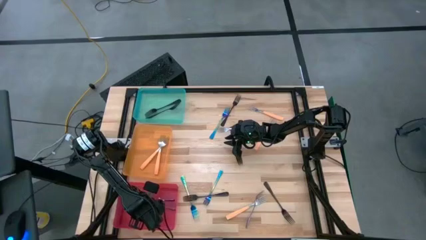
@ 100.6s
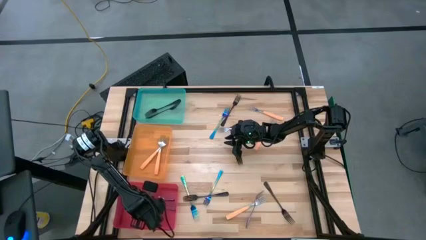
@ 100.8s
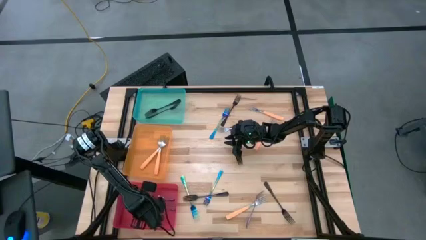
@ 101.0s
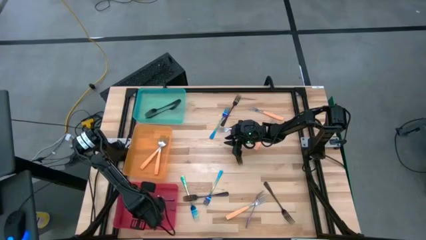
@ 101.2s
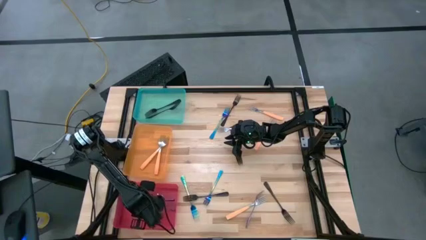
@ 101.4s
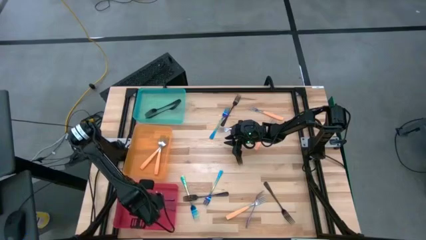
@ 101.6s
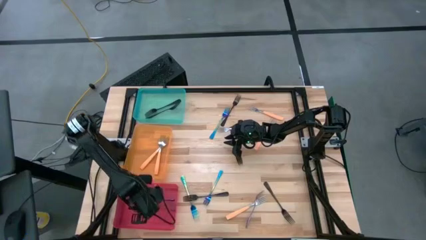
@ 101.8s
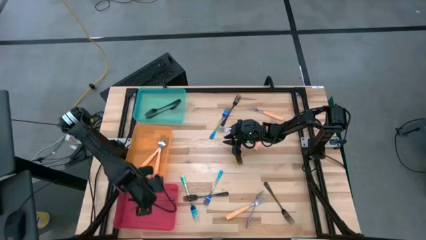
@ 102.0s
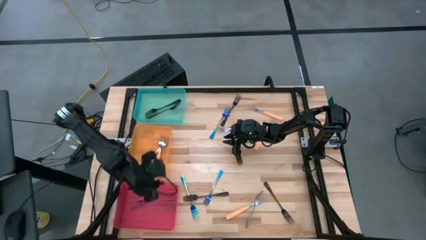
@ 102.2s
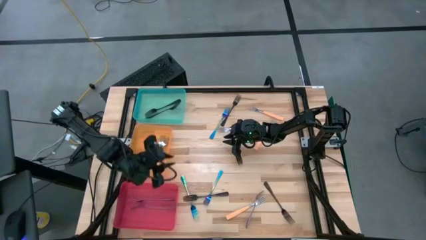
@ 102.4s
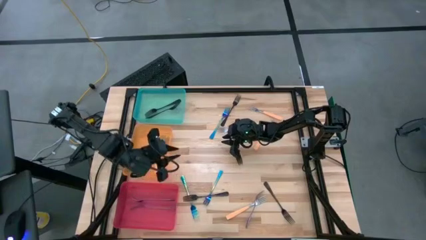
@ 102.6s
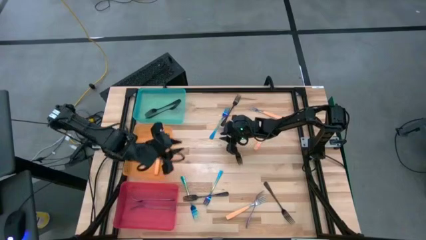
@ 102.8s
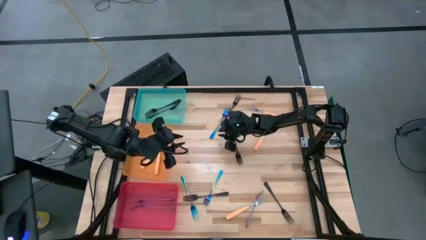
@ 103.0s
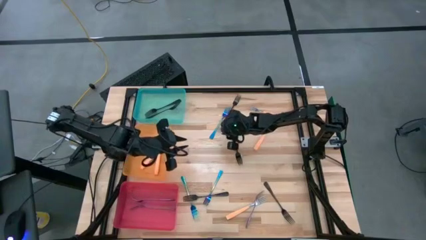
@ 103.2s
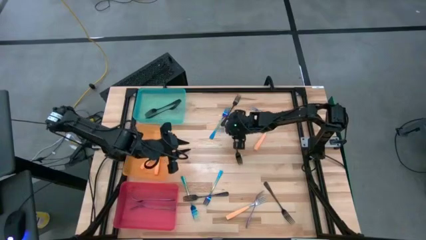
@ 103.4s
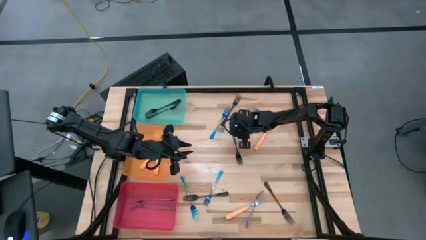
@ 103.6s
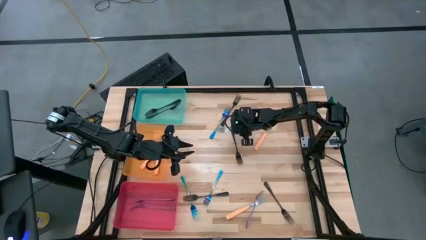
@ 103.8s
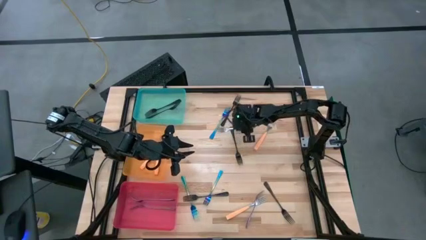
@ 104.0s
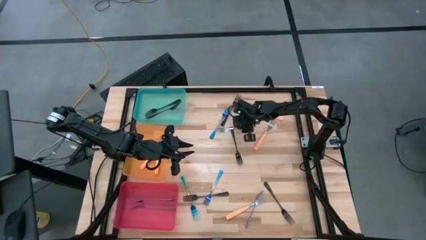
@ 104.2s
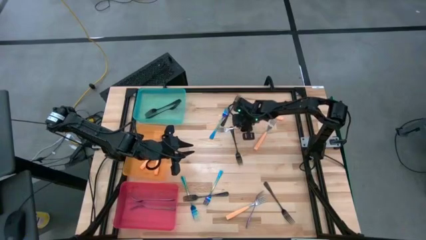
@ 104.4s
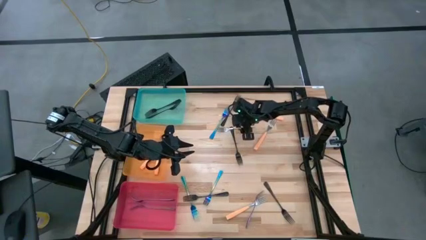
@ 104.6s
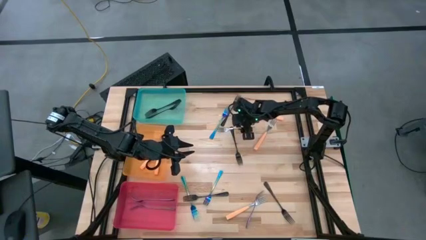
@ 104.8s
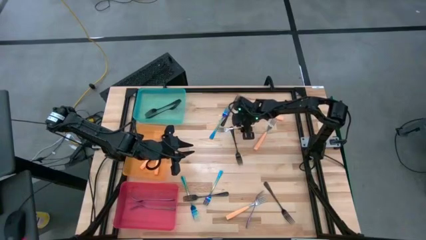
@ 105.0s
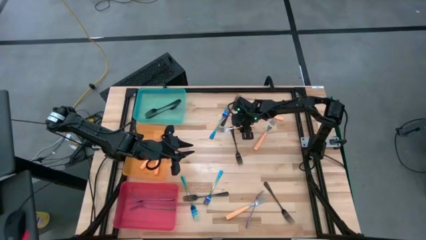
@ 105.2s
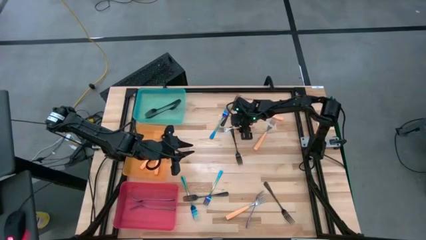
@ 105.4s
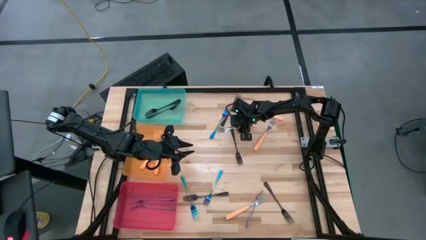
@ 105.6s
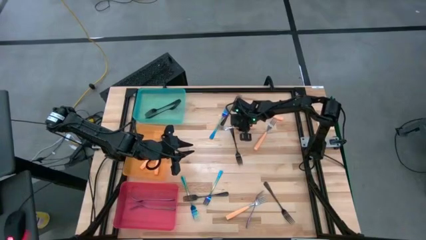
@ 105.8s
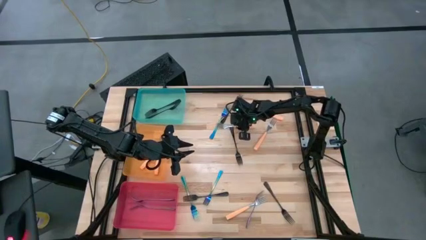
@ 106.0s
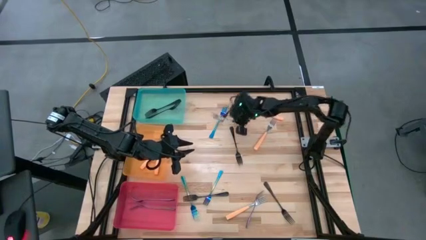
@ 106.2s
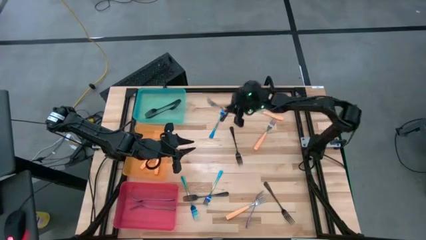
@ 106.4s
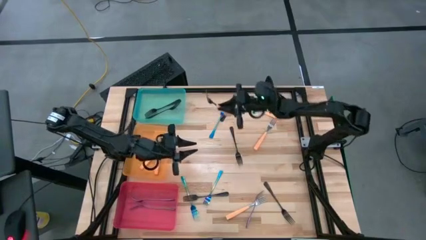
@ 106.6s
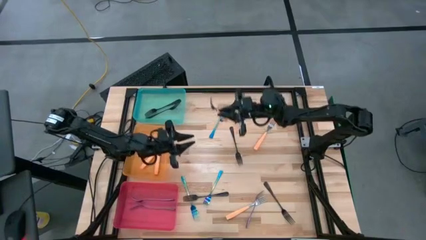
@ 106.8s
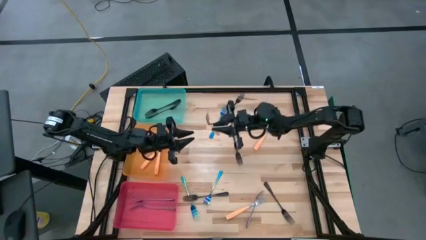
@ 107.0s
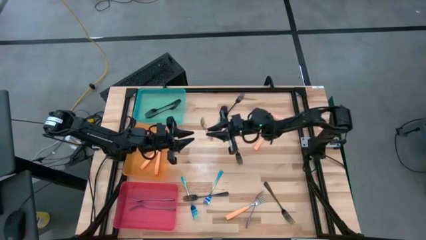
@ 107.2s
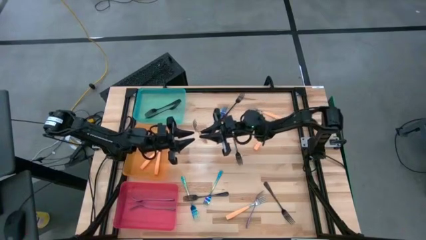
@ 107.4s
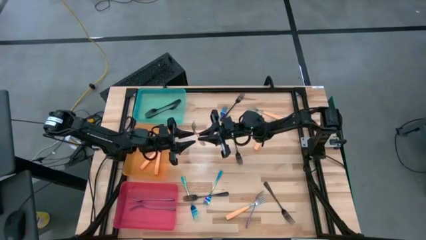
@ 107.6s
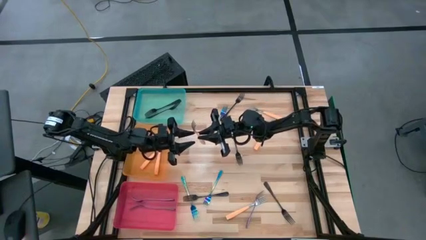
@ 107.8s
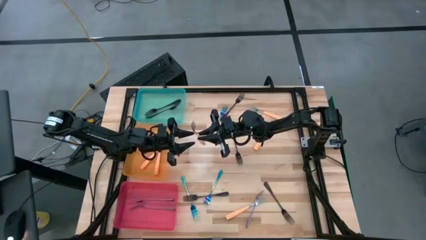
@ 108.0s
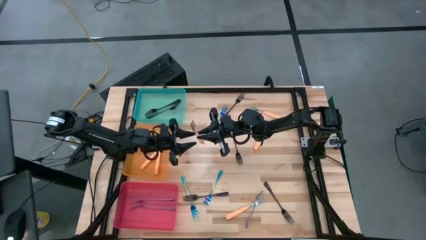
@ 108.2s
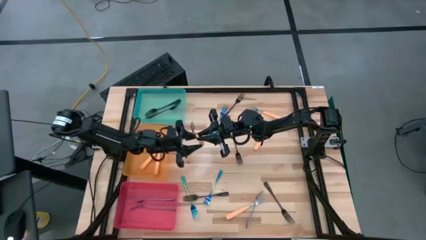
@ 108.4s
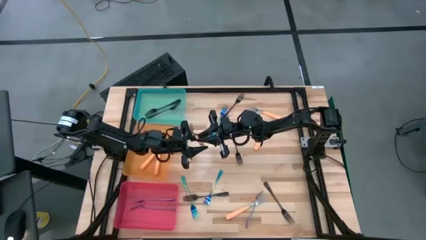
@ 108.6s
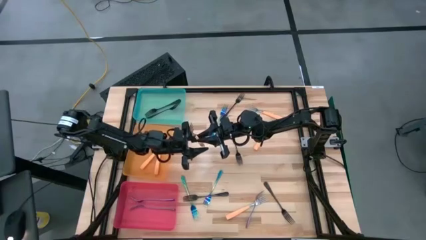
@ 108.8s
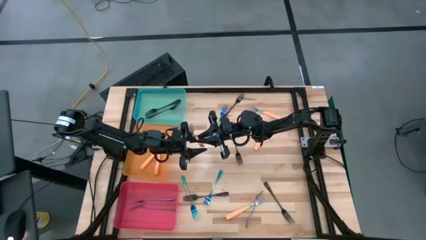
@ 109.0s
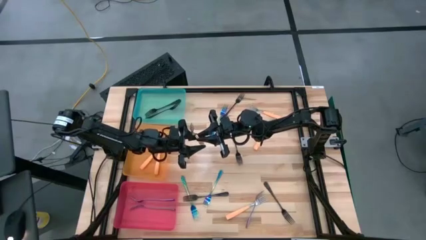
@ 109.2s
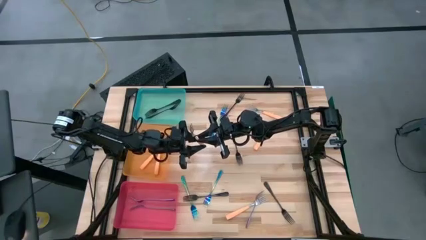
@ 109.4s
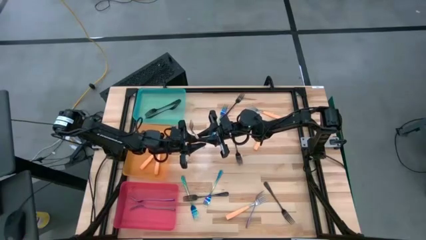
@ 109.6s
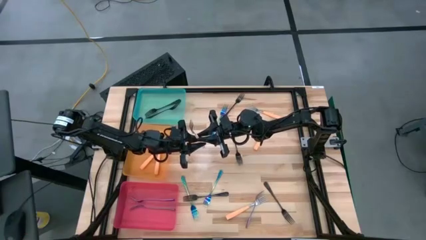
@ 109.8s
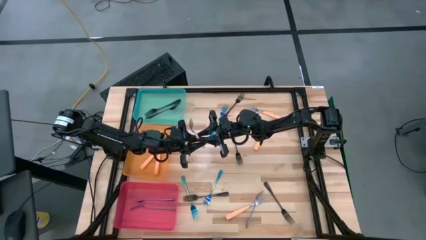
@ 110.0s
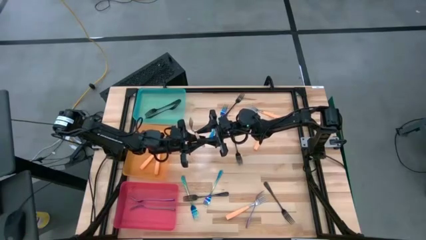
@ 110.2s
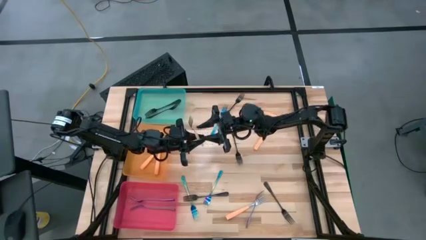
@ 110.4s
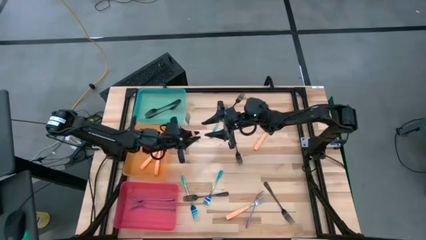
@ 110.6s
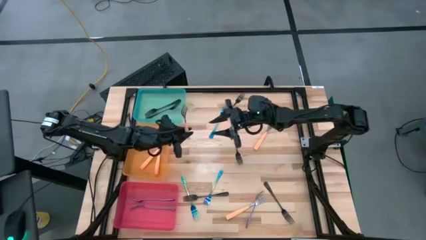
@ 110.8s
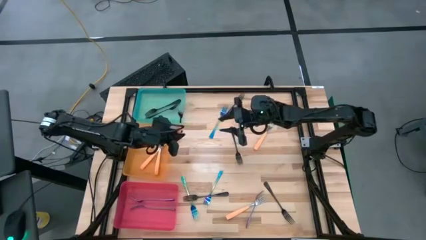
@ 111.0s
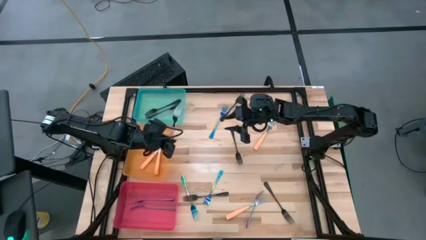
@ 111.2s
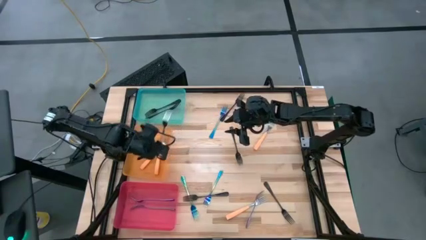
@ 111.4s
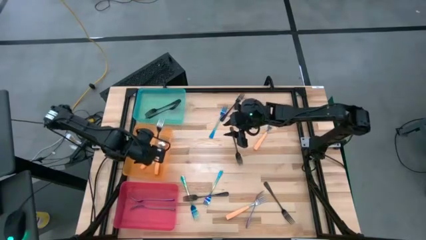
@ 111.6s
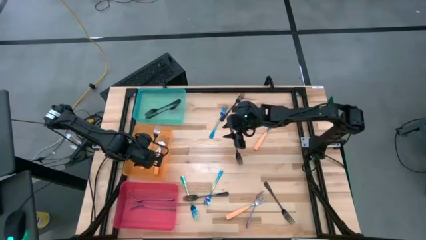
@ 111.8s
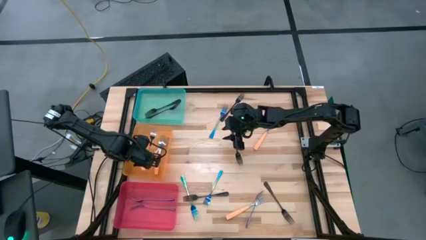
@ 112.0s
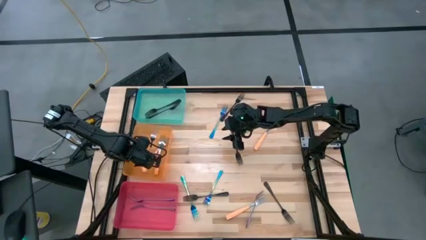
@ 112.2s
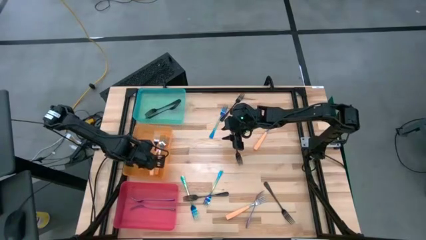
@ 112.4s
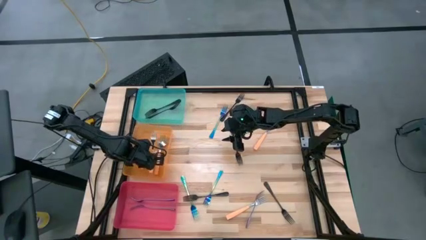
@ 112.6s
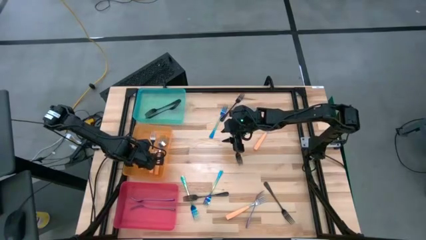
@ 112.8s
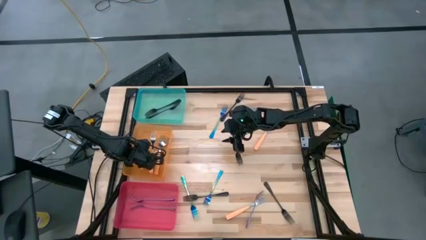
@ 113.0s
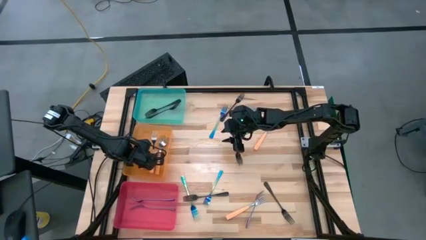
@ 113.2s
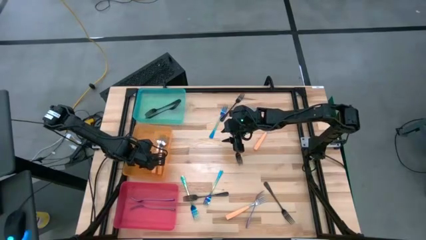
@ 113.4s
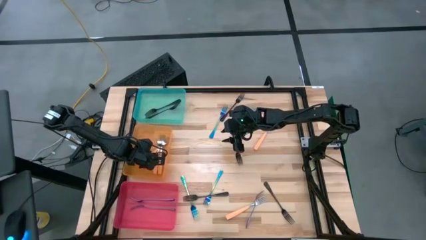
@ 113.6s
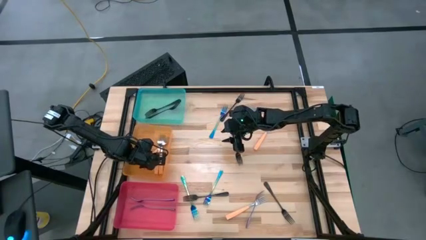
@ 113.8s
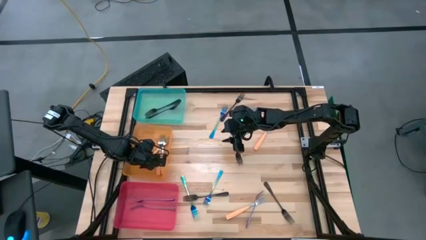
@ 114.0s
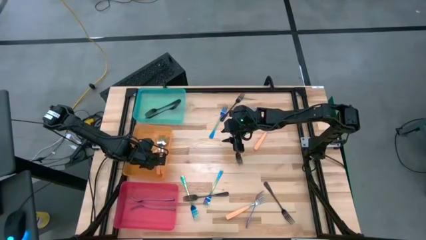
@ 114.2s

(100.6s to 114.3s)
Task: Sort silverware by color (type)
Put the orange fork into the orange bin
